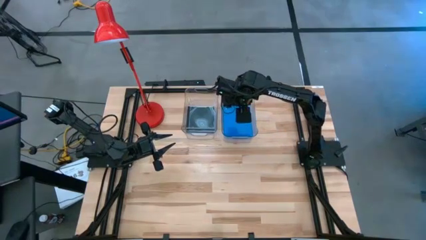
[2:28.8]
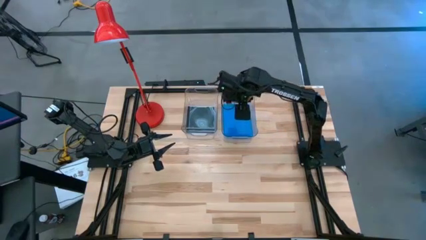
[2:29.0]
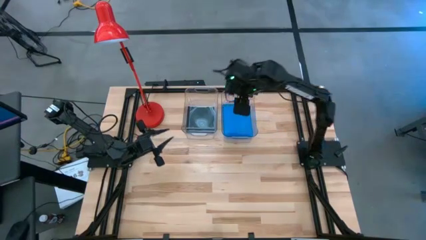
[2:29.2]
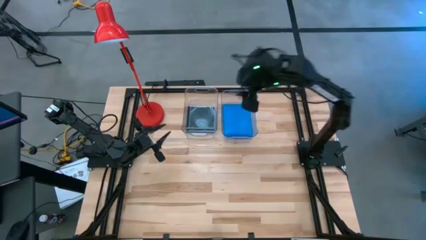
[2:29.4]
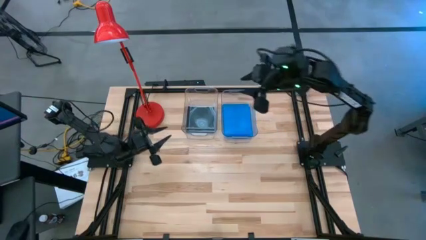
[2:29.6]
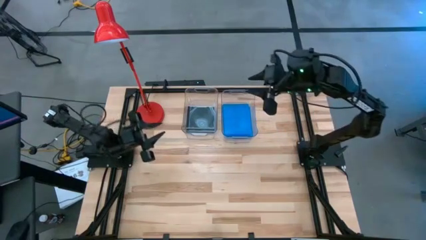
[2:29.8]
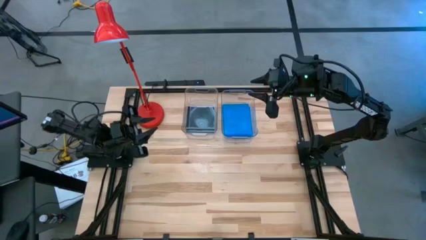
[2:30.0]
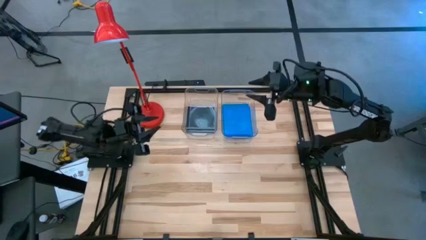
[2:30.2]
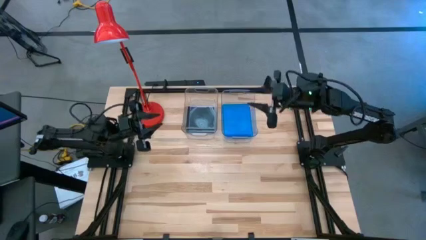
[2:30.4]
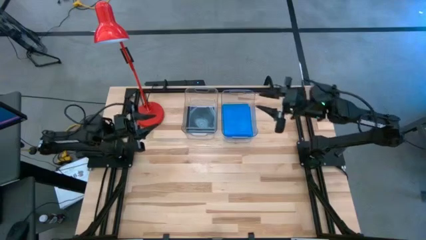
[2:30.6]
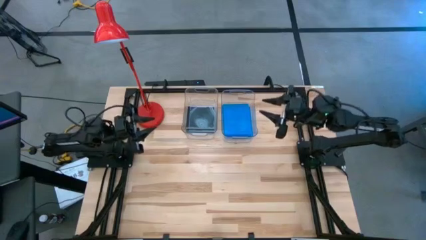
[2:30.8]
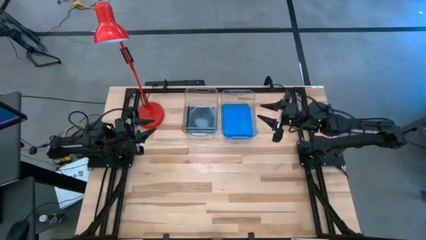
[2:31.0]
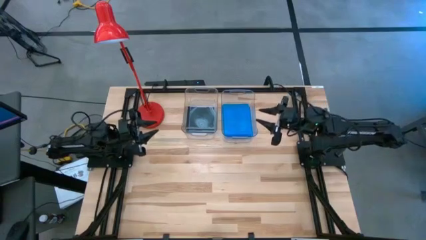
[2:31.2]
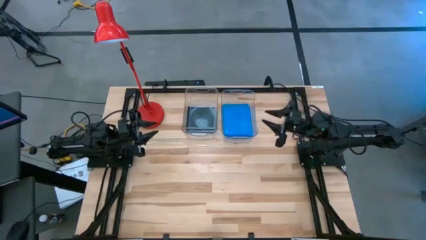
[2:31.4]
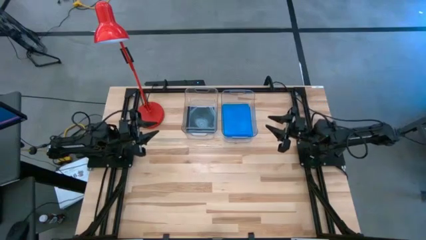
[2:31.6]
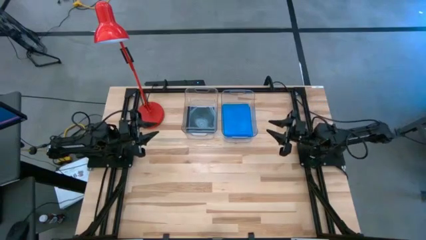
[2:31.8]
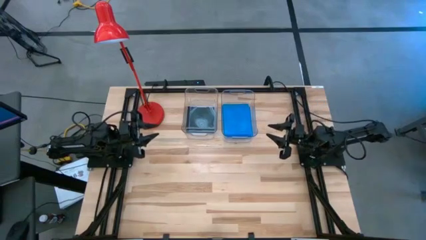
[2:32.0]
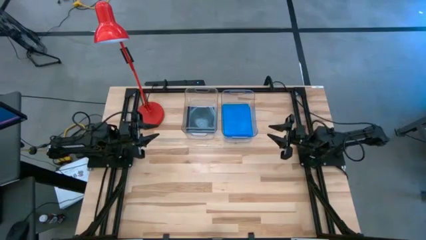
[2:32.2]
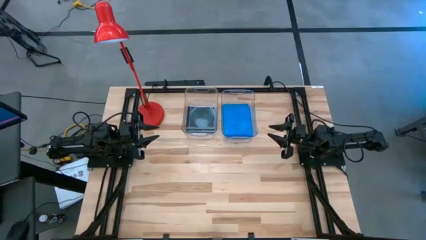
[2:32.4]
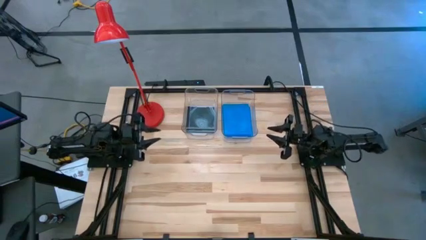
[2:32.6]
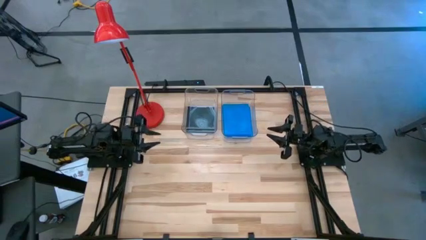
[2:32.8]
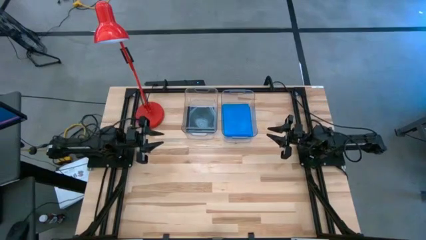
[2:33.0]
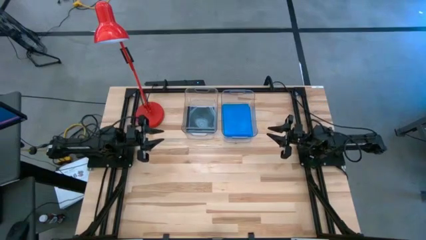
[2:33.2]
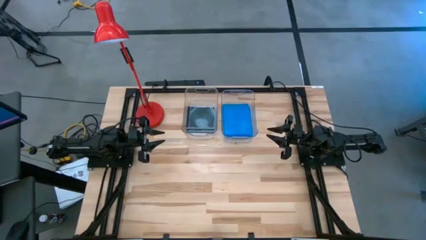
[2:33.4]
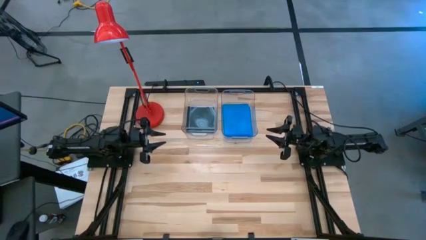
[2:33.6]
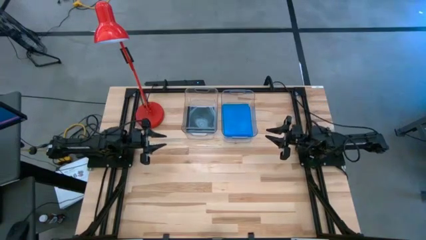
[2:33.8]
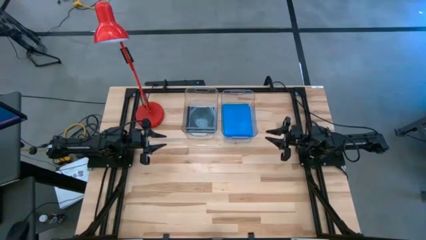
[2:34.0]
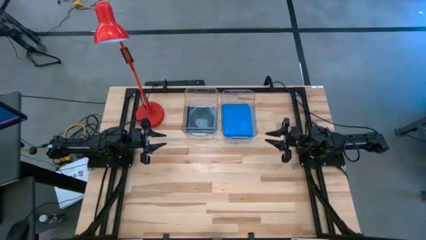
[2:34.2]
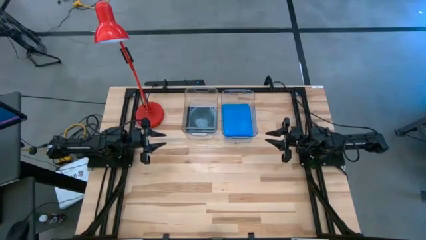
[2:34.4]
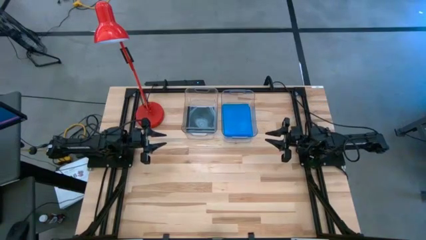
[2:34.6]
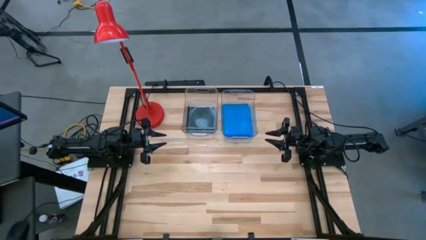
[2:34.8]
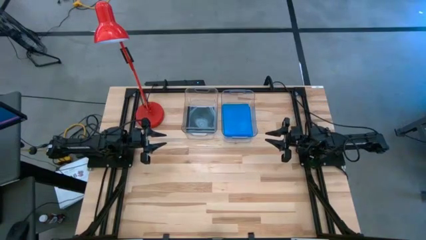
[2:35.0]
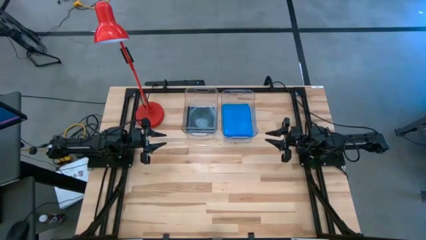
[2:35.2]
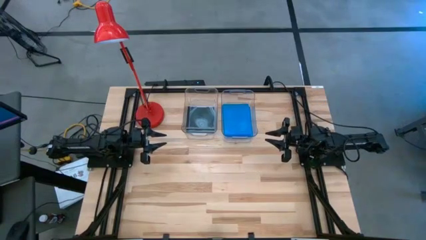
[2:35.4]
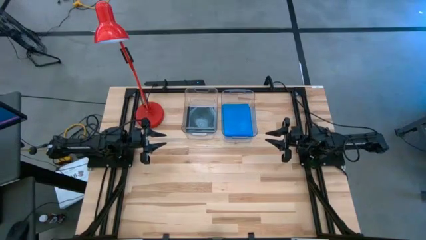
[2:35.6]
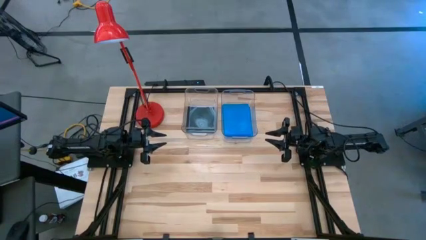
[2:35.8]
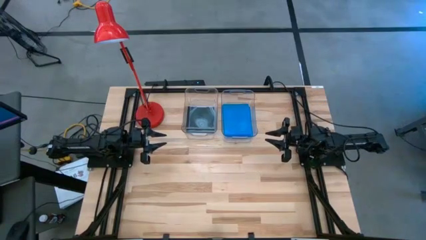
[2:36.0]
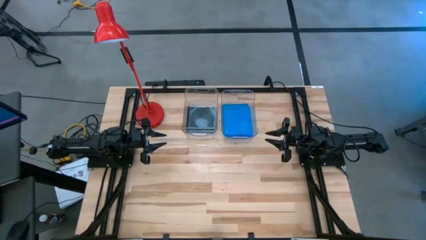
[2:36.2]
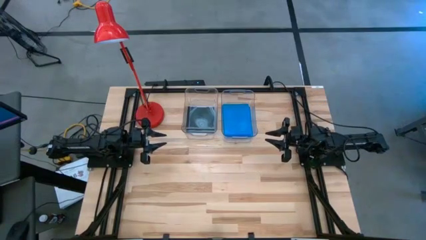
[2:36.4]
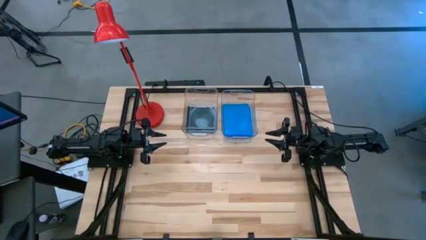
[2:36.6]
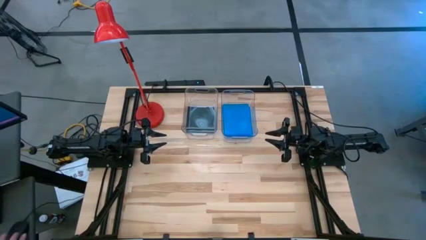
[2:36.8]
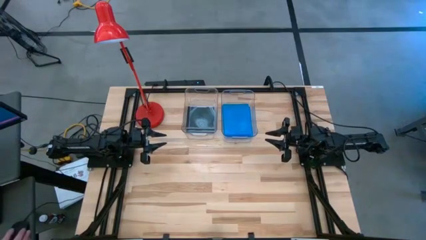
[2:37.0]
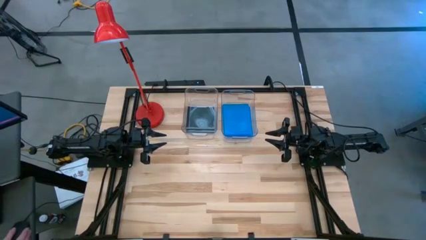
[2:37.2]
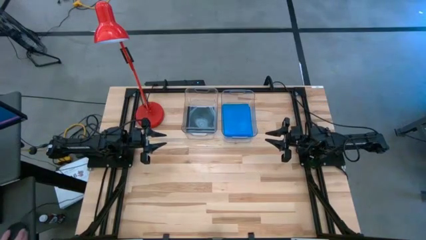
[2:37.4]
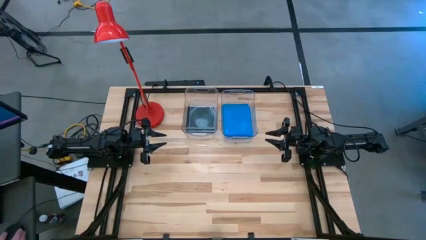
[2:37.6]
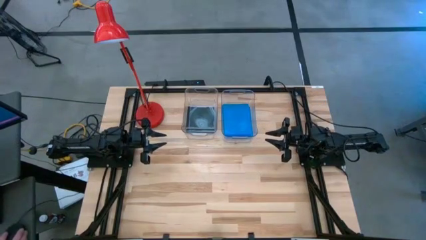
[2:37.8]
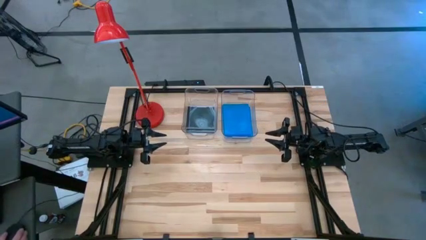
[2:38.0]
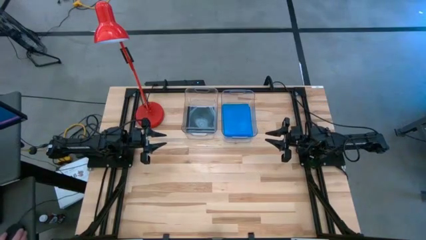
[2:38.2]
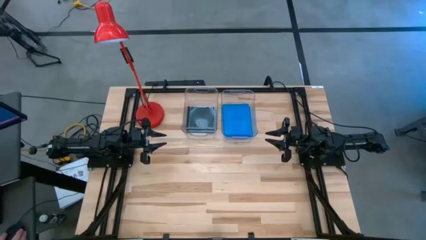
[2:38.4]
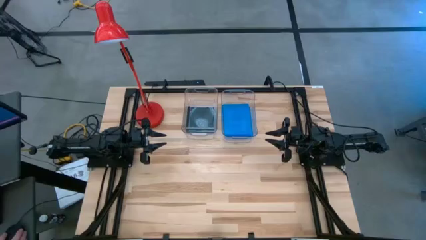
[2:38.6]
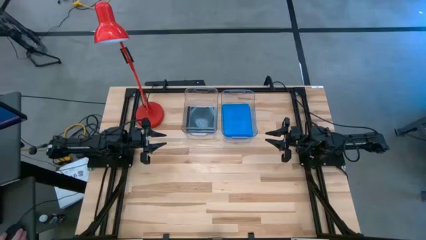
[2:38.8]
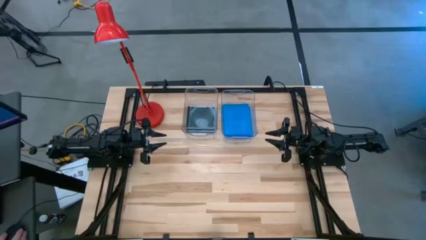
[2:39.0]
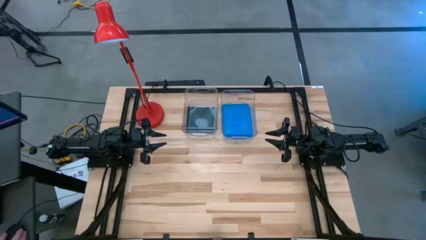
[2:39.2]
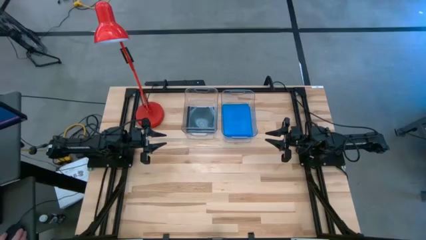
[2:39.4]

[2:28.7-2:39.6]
Task: Pick & place jewel cases by type
Return to Home Position

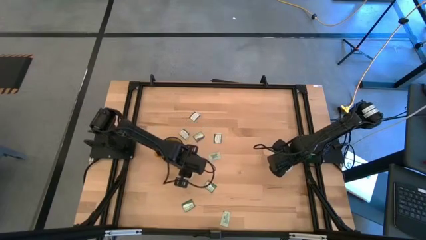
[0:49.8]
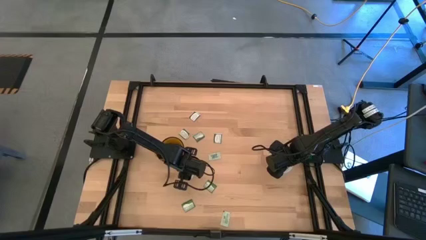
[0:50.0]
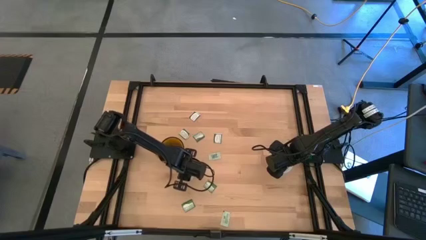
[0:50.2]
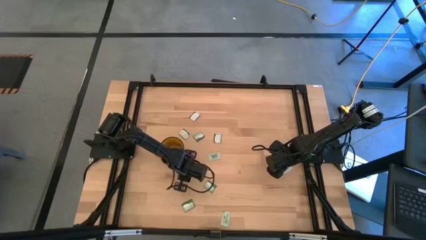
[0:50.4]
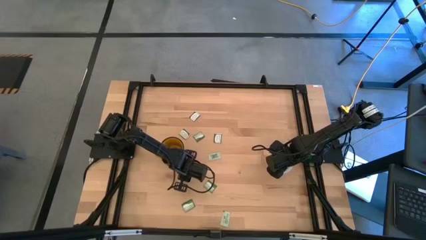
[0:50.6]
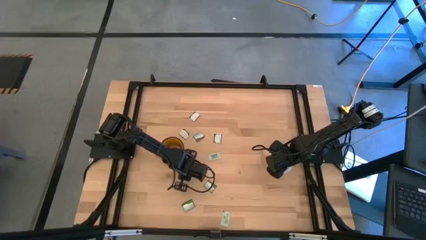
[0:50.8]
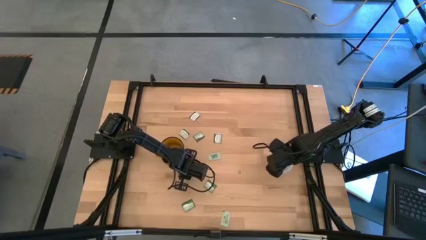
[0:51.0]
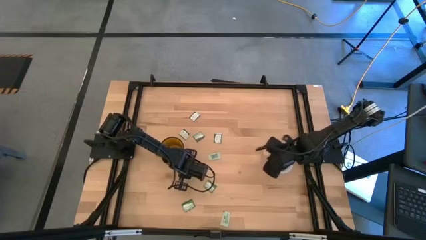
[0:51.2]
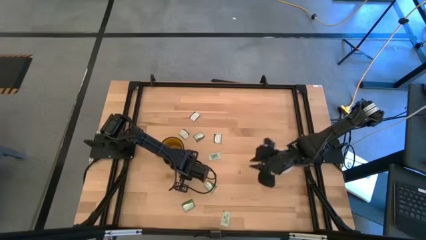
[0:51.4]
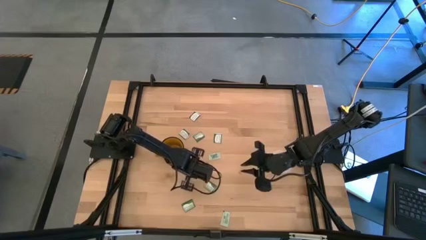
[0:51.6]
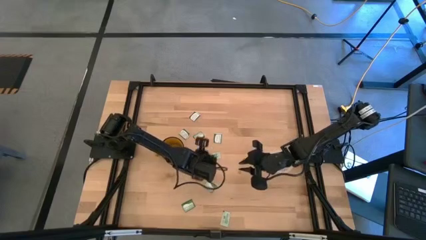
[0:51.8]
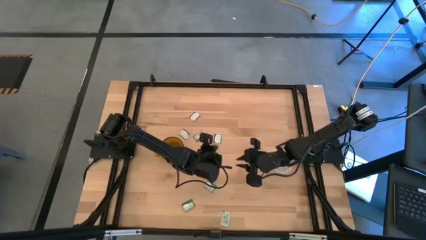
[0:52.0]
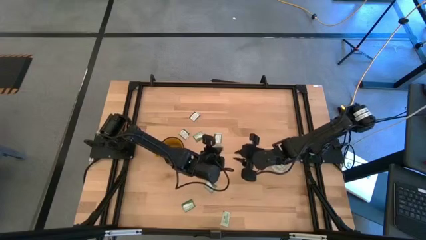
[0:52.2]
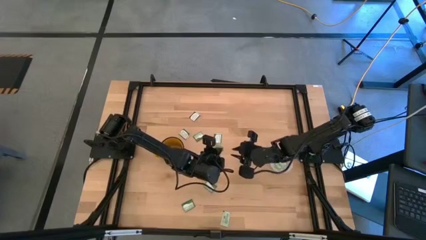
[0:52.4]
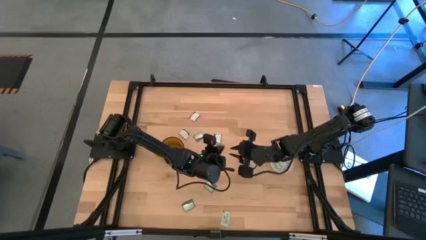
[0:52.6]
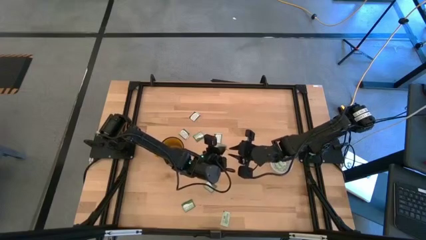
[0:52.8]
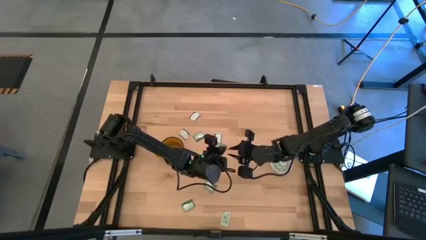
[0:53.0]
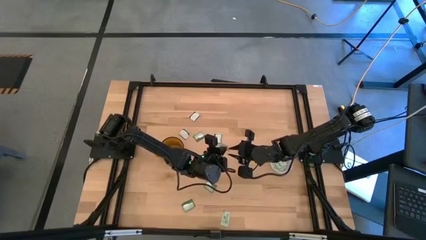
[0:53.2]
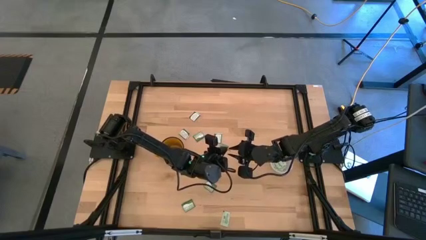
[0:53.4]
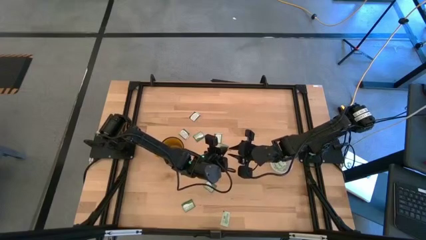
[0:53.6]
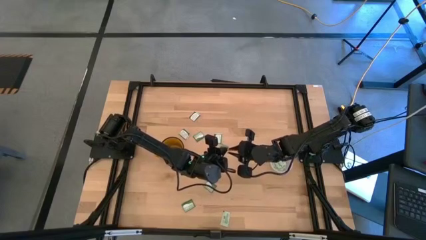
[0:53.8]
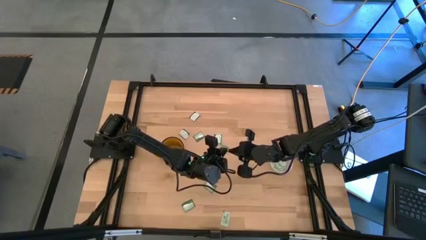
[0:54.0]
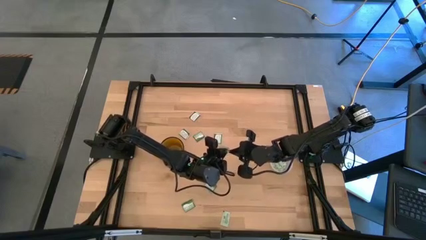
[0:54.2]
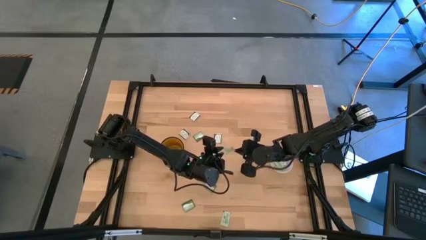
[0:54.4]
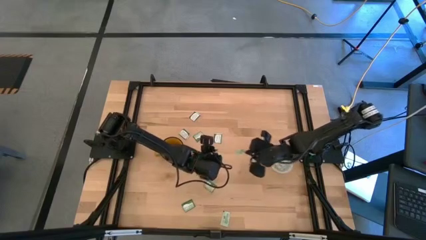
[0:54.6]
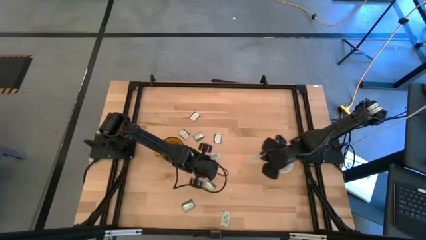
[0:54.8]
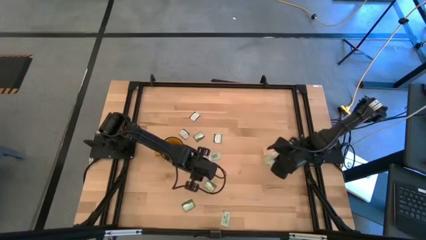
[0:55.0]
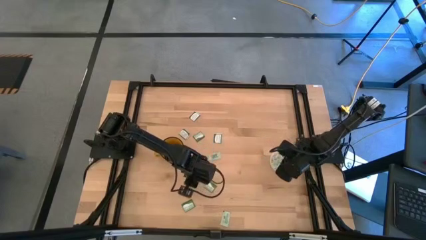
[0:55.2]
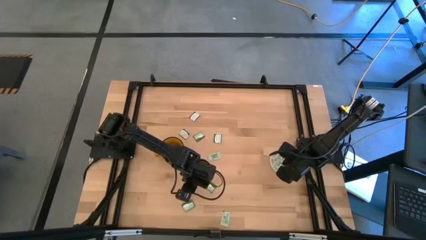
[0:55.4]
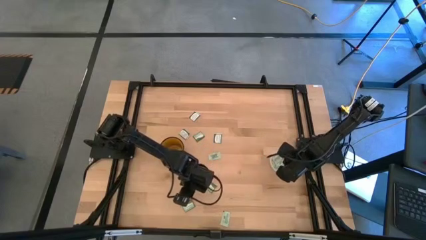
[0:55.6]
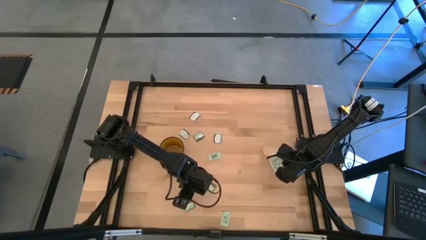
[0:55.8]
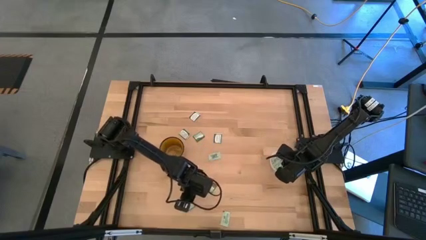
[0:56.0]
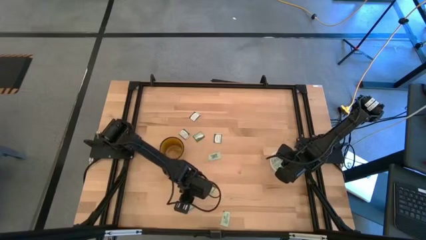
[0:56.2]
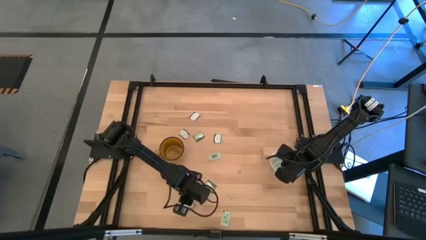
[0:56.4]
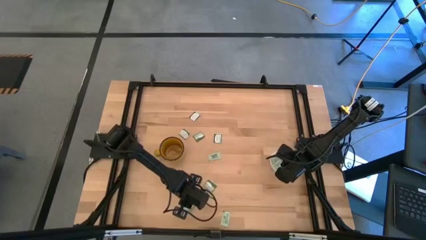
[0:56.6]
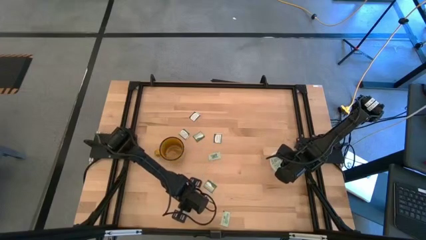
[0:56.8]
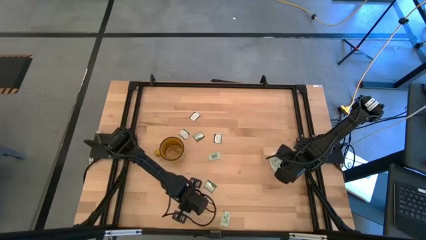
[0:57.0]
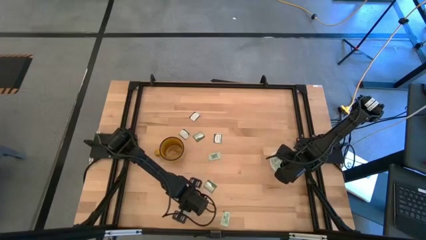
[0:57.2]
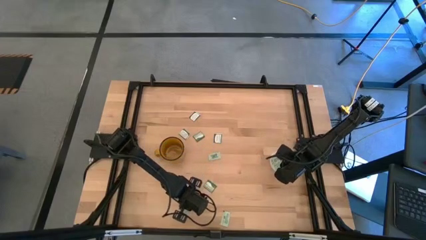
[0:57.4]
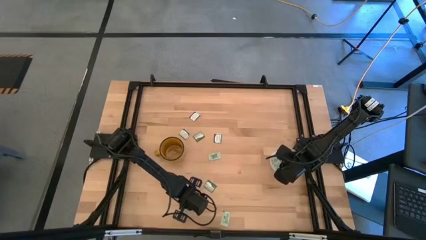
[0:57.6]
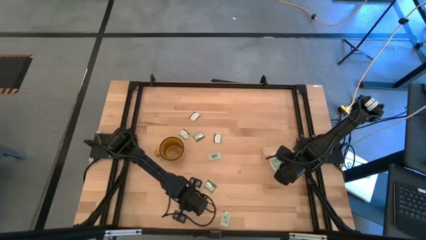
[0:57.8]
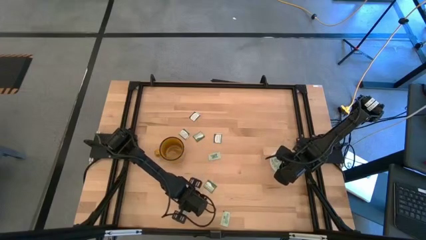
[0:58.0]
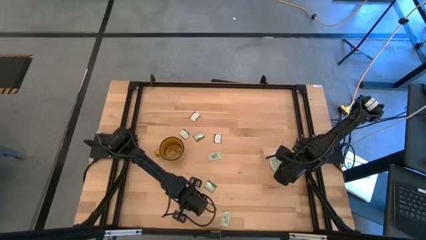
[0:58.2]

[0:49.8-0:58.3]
Task: Pick and place Stevia / Truvia into bins
Put the green stevia packet into the transparent container
